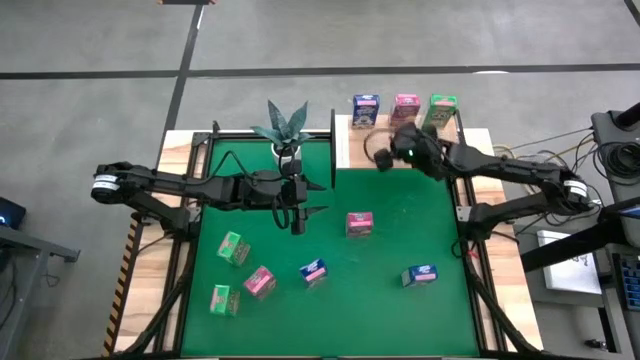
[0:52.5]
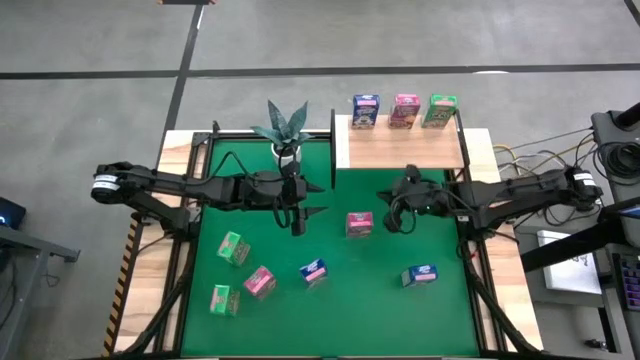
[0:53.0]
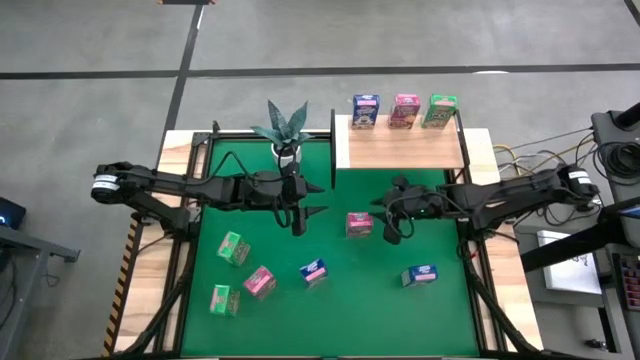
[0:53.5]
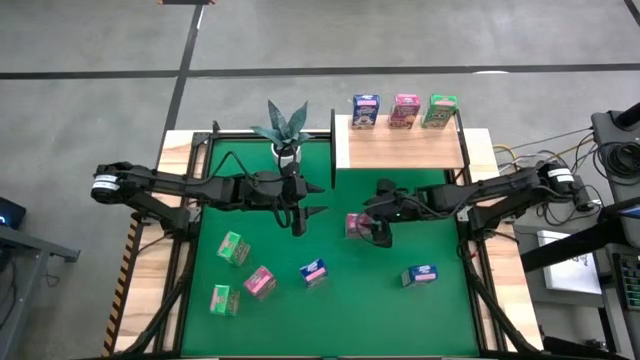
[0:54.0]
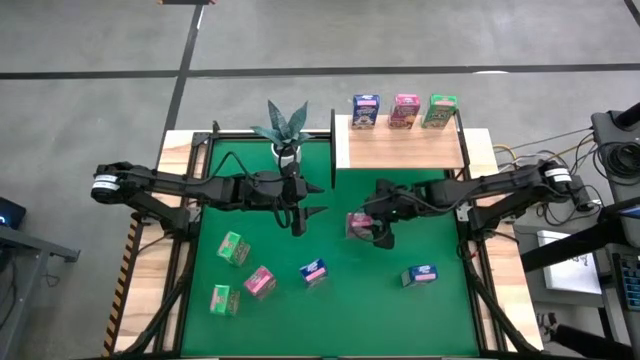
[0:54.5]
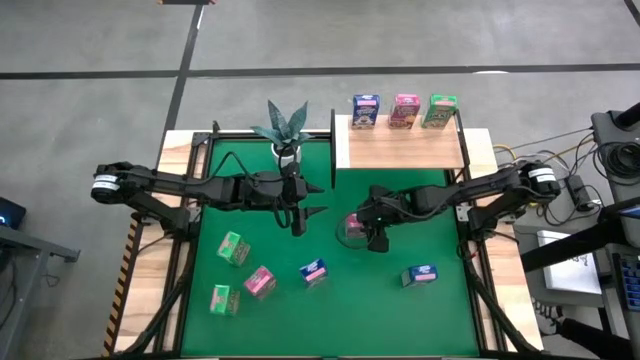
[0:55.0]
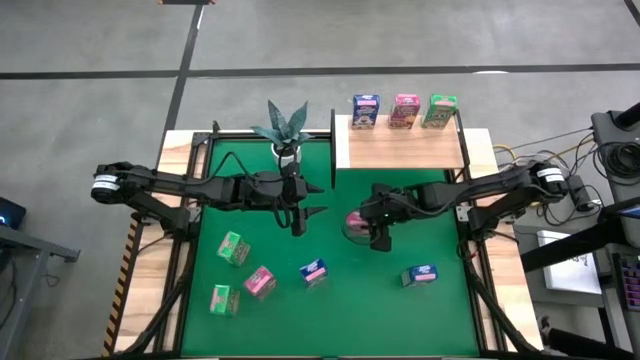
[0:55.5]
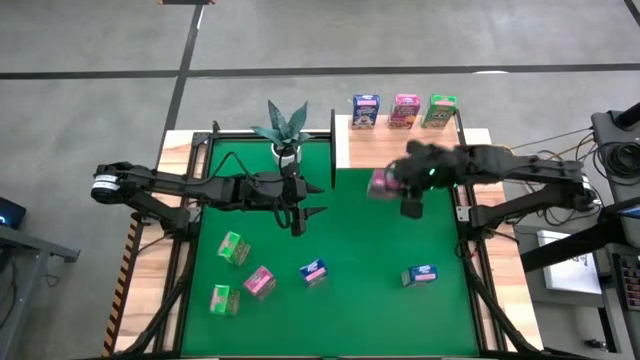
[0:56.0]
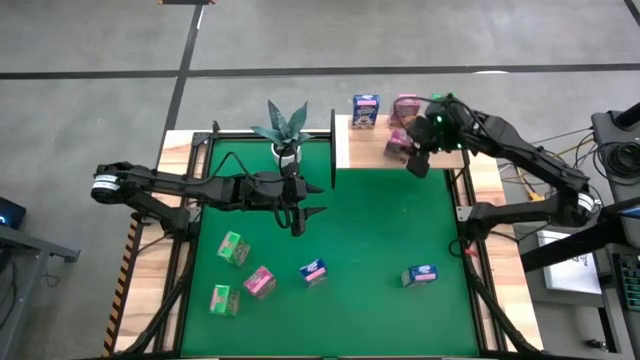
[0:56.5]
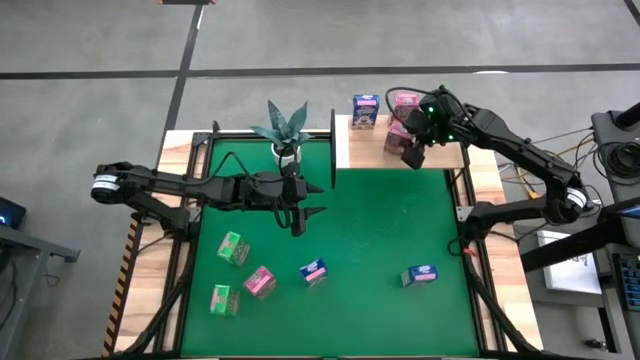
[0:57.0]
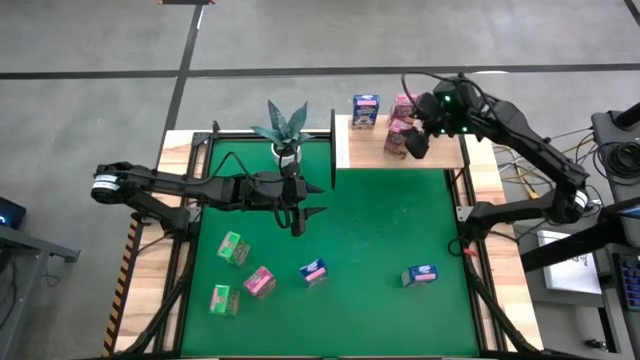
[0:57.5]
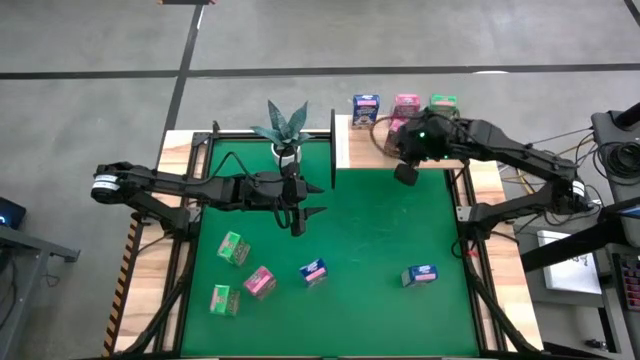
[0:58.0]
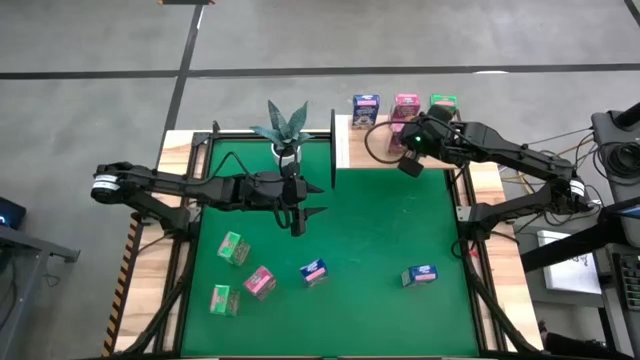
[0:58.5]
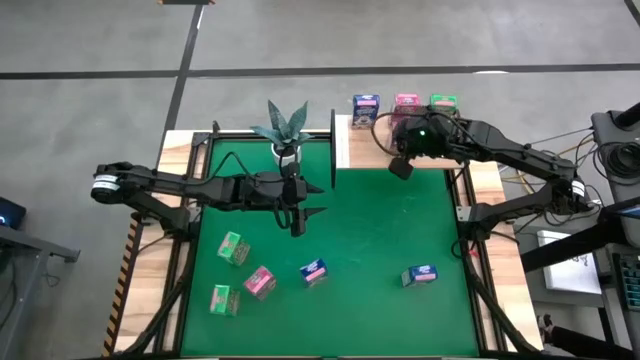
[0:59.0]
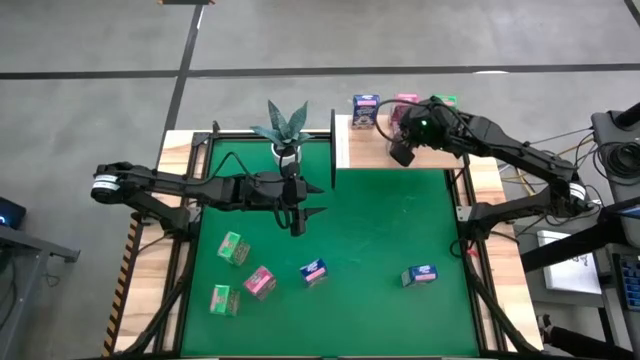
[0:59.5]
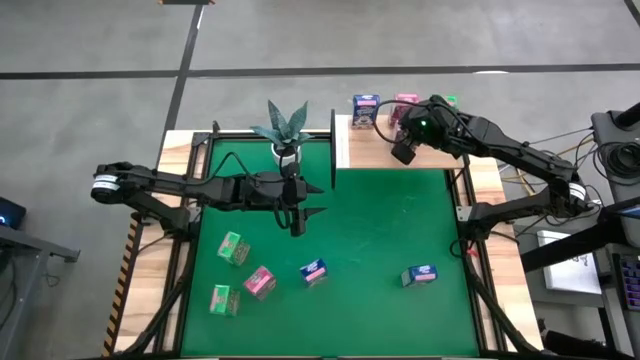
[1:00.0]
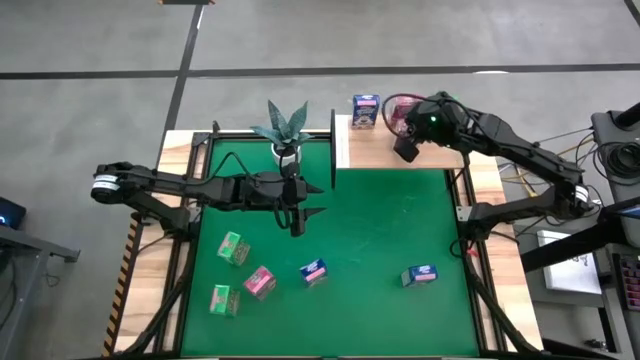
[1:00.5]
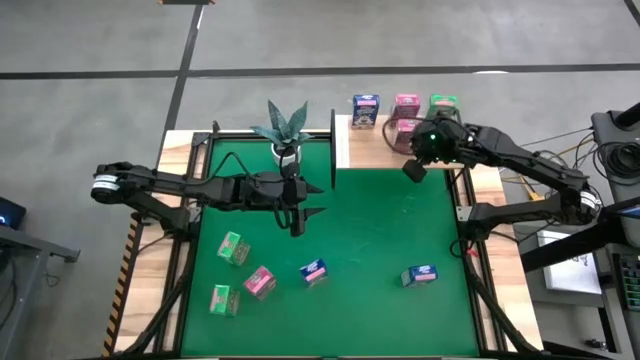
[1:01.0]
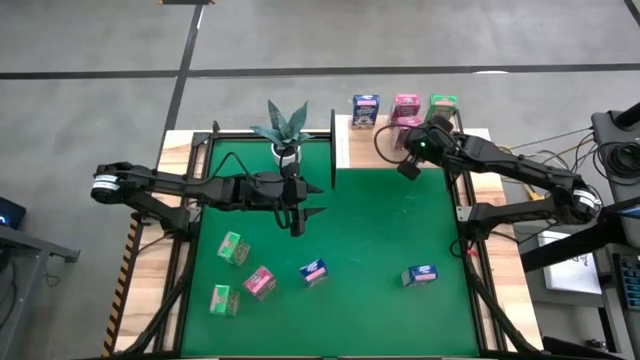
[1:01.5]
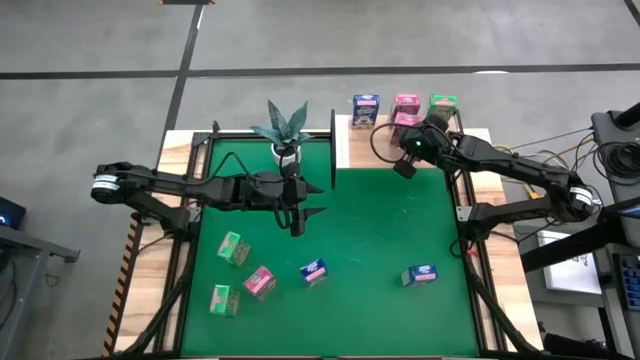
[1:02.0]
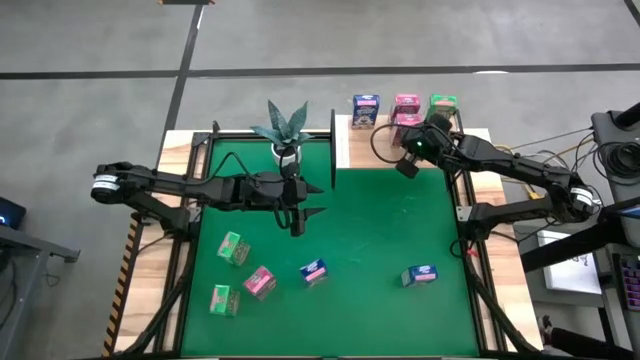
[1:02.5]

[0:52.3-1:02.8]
Task: Stack cereal on shelf
Put the right pink cereal box on the shelf aligned with the other pink cereal box

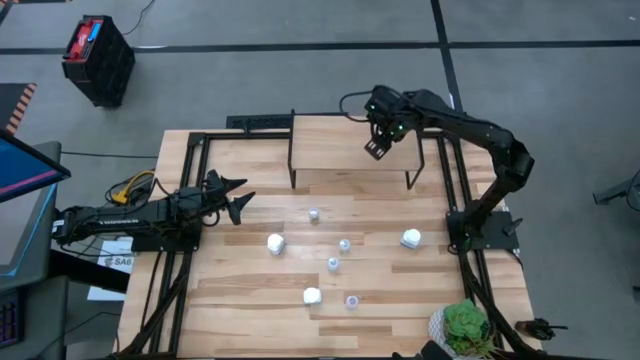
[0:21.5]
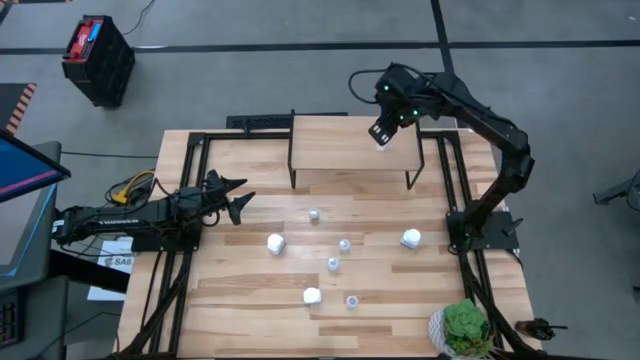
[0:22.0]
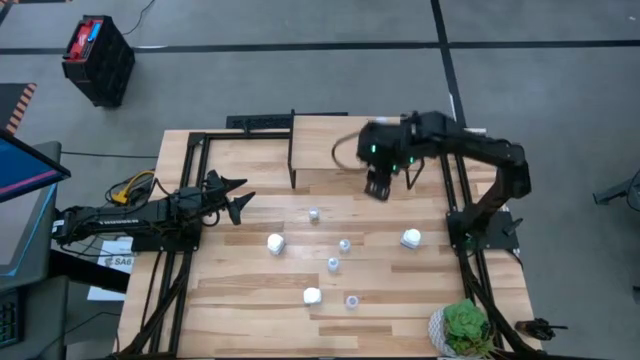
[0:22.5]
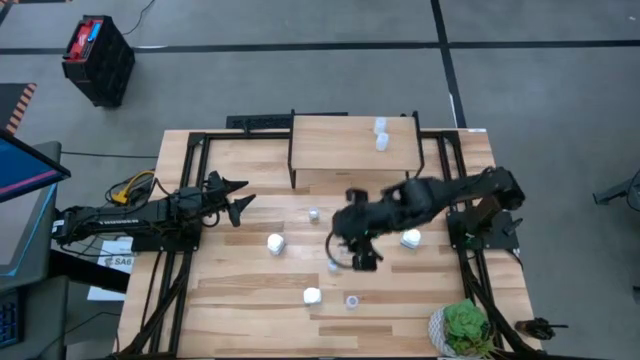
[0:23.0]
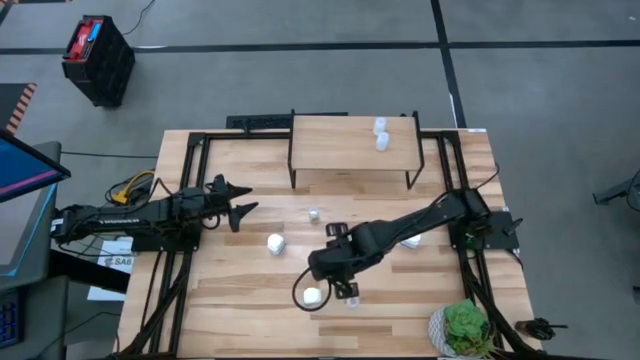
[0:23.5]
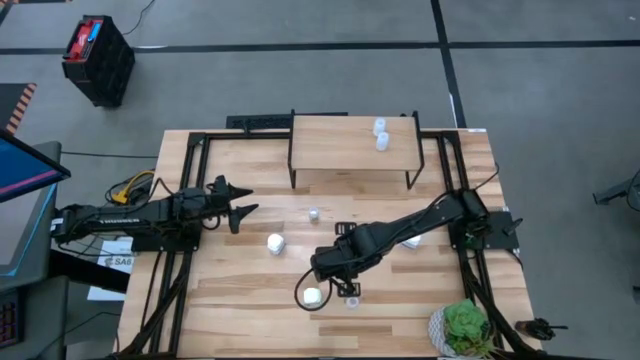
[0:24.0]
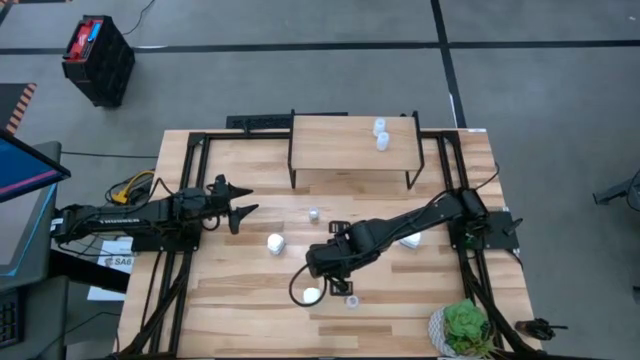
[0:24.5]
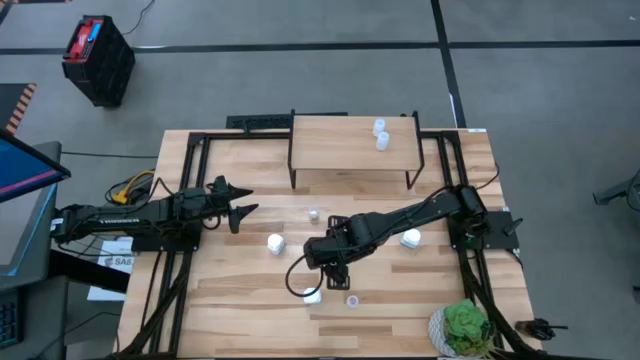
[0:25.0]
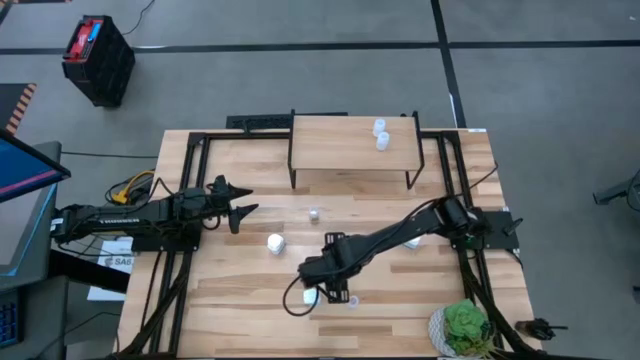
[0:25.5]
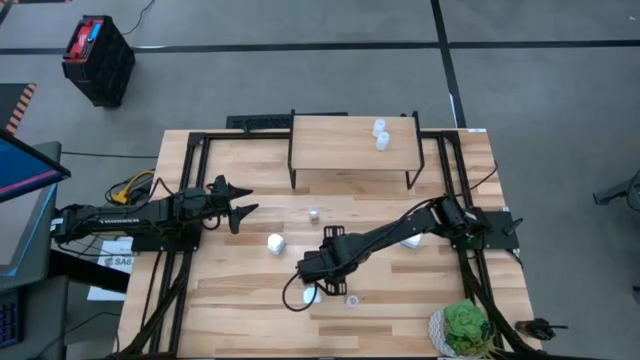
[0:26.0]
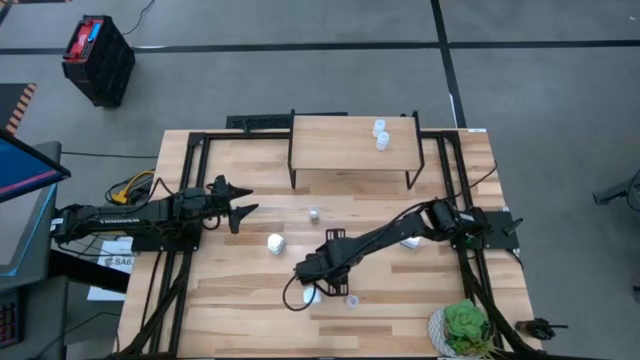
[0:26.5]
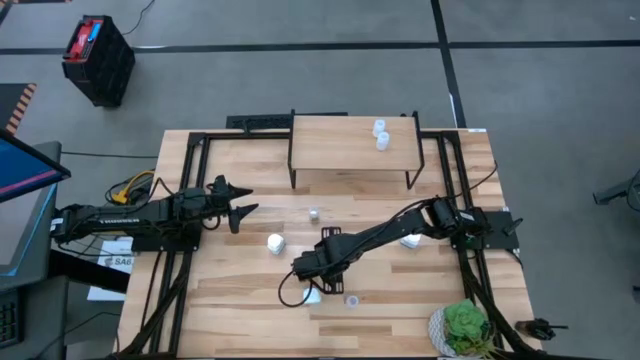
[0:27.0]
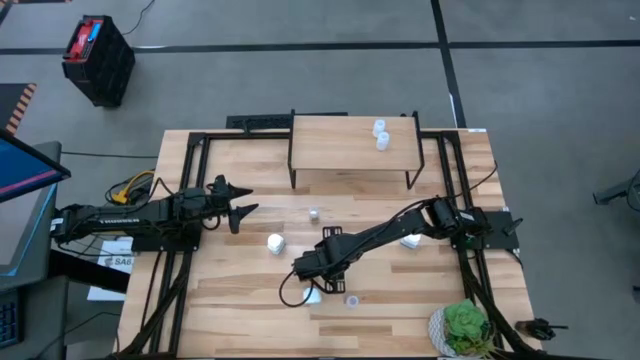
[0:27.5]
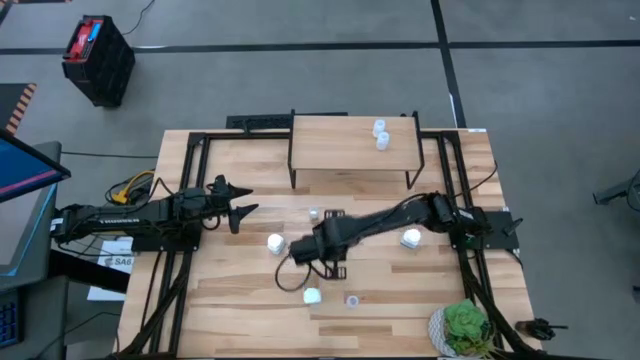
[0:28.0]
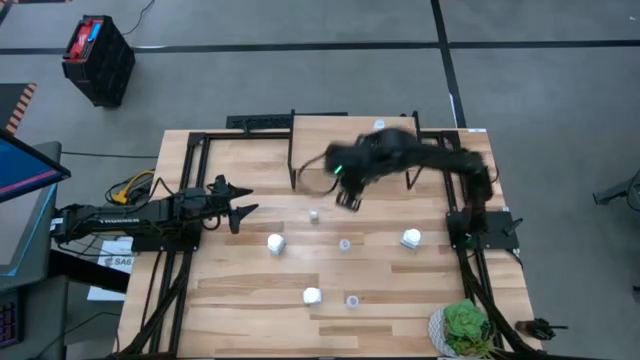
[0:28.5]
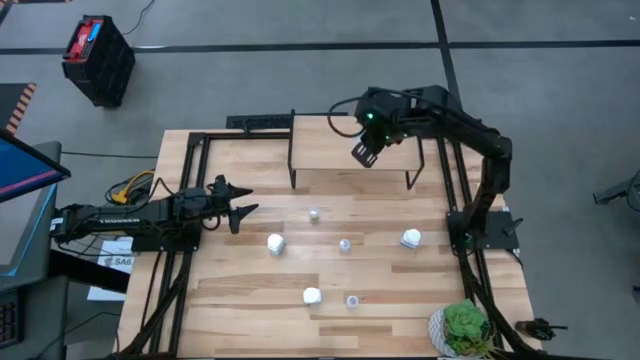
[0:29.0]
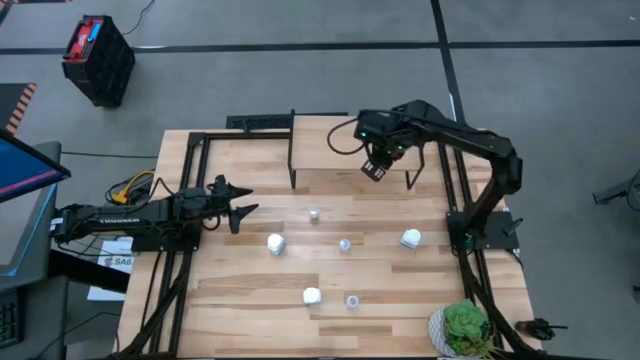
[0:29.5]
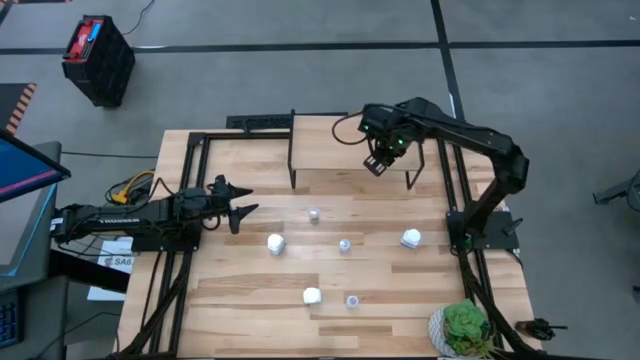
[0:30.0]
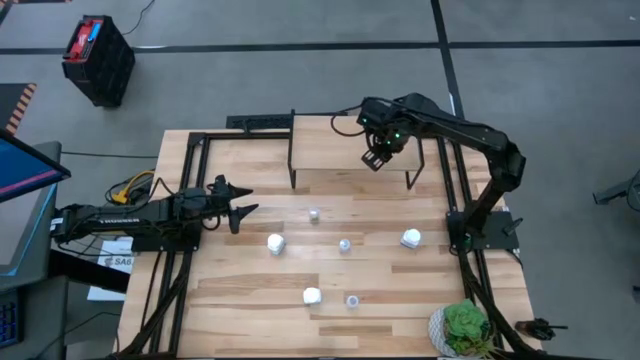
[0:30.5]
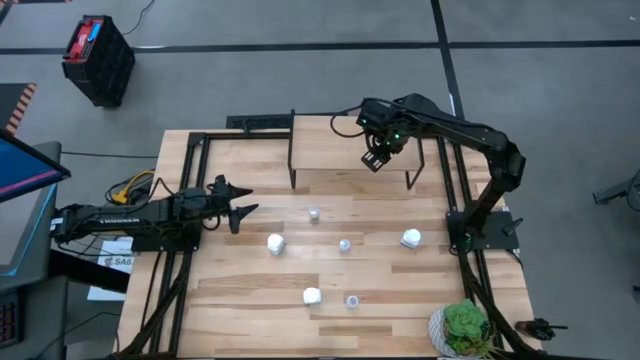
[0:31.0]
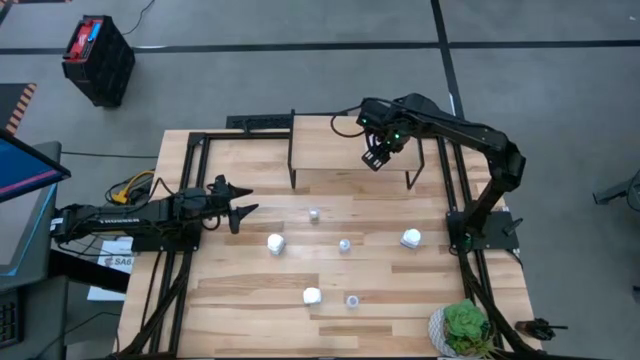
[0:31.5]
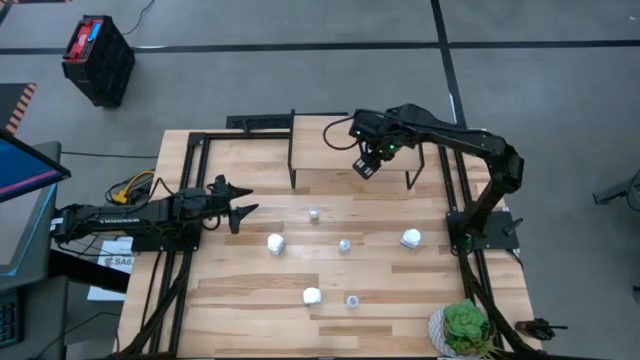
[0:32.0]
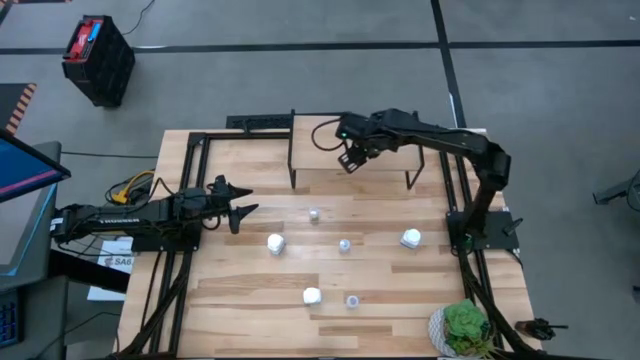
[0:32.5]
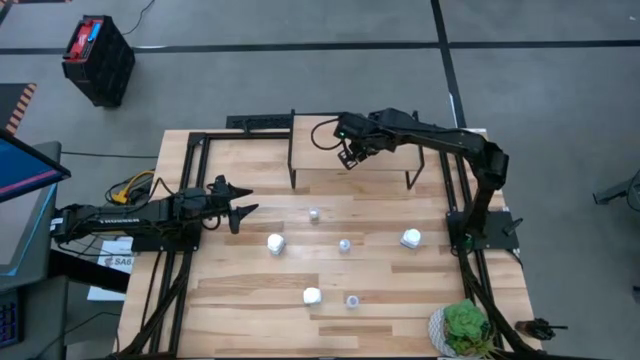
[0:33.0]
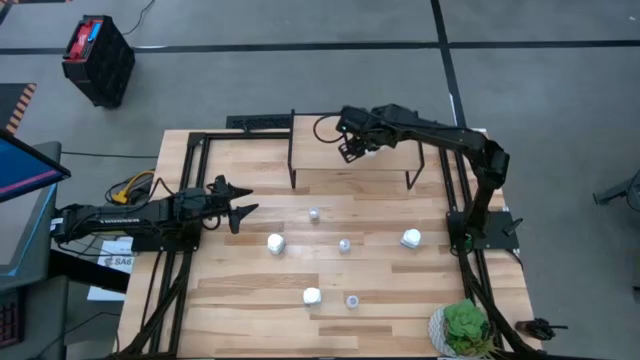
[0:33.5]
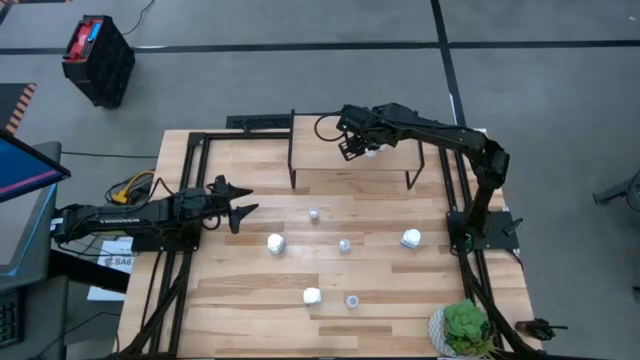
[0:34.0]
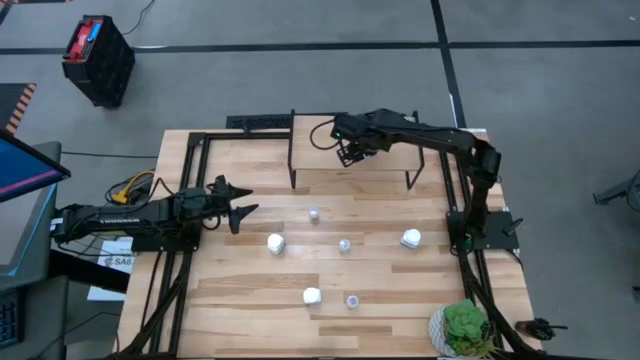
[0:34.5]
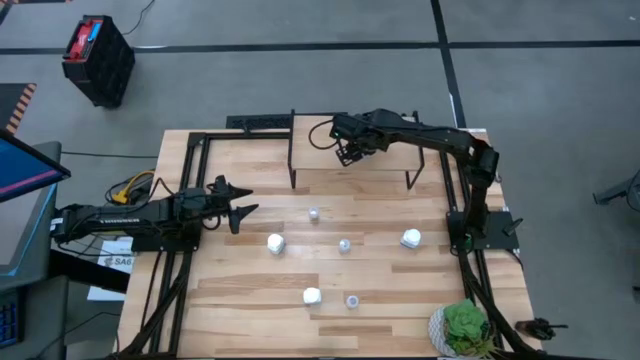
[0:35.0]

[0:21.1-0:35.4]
Task: Pick and place medicine bottles onto shelf by color
Put the white pill bottle on the shelf
